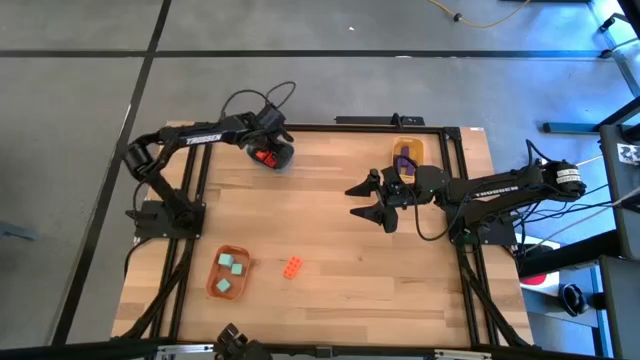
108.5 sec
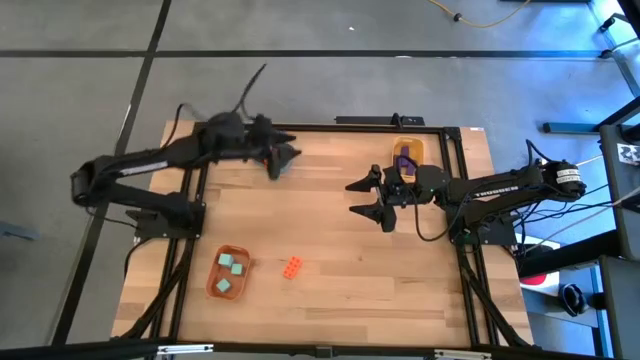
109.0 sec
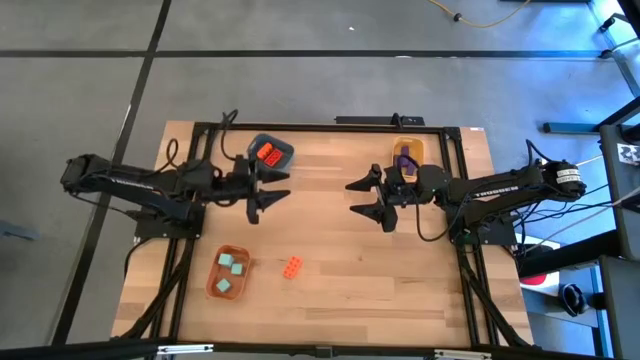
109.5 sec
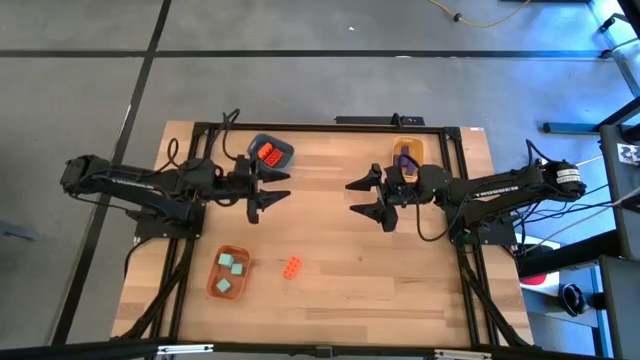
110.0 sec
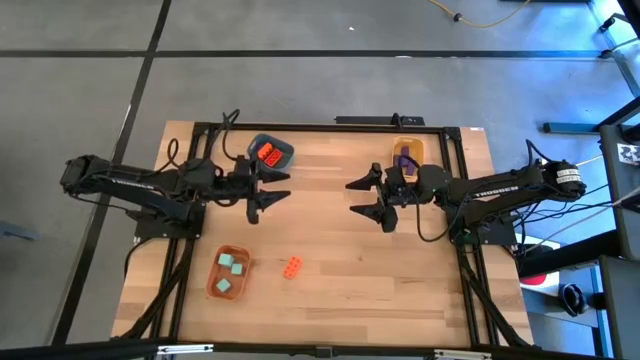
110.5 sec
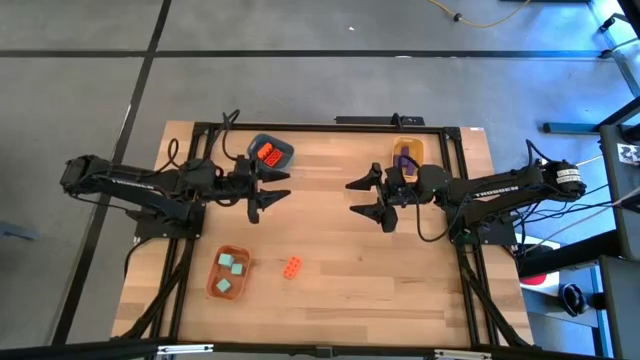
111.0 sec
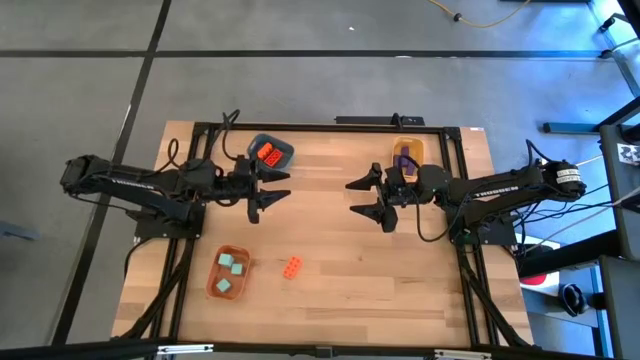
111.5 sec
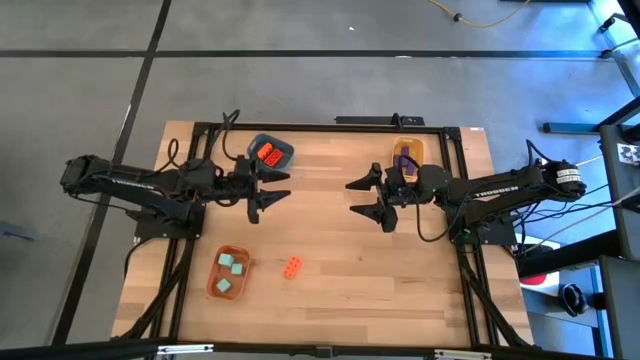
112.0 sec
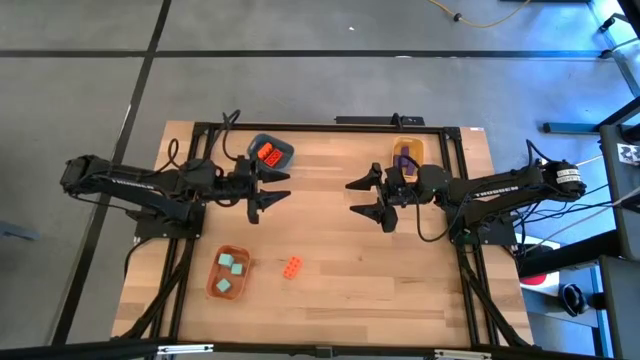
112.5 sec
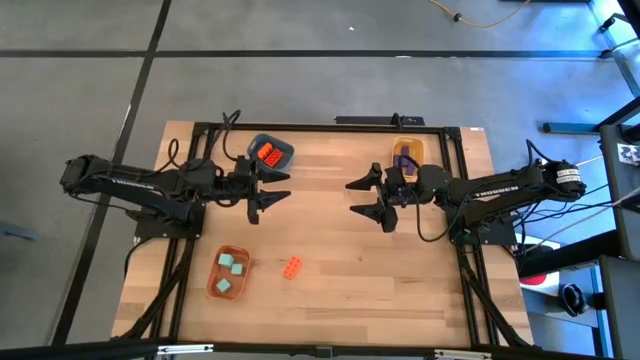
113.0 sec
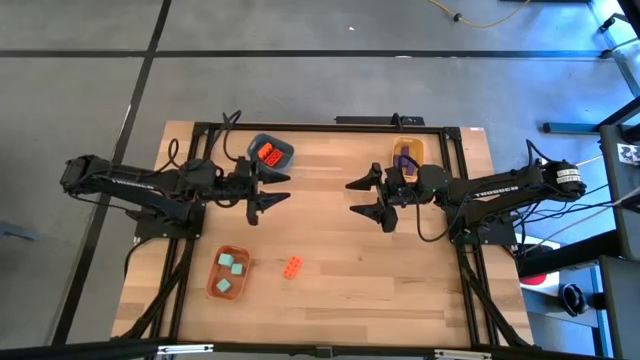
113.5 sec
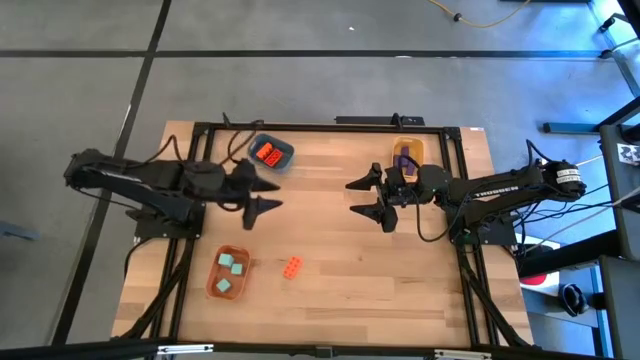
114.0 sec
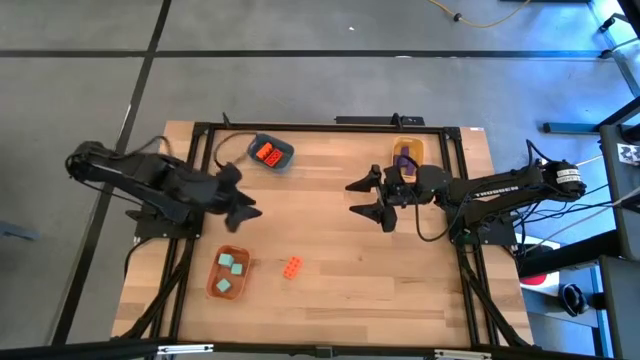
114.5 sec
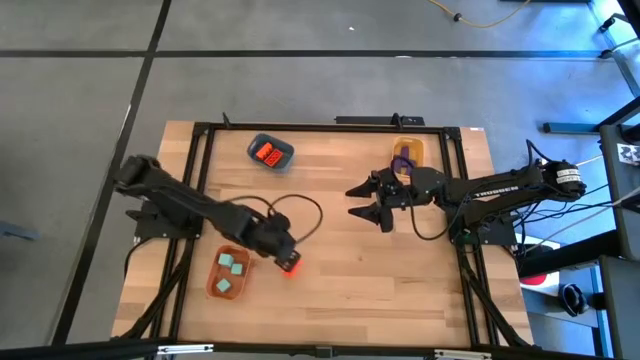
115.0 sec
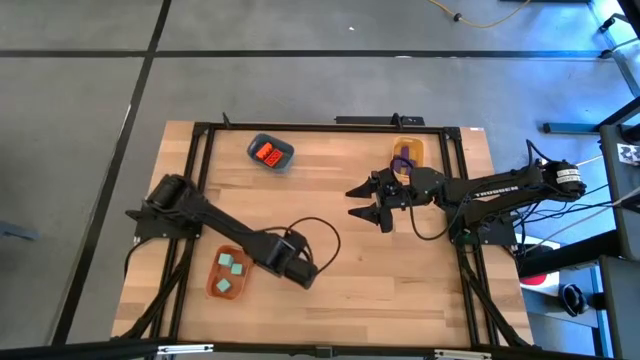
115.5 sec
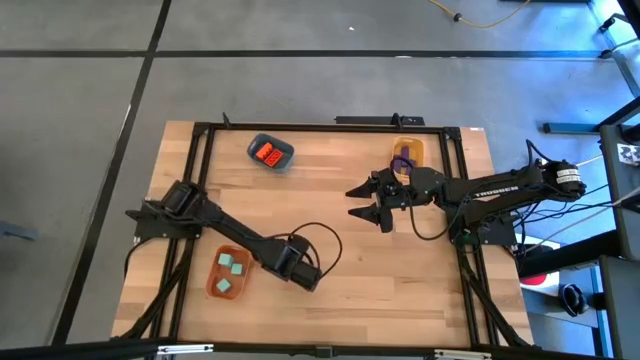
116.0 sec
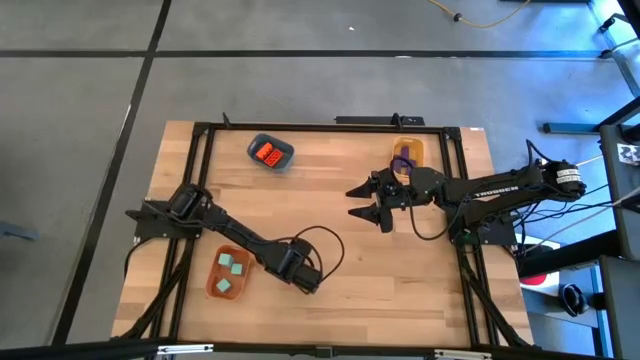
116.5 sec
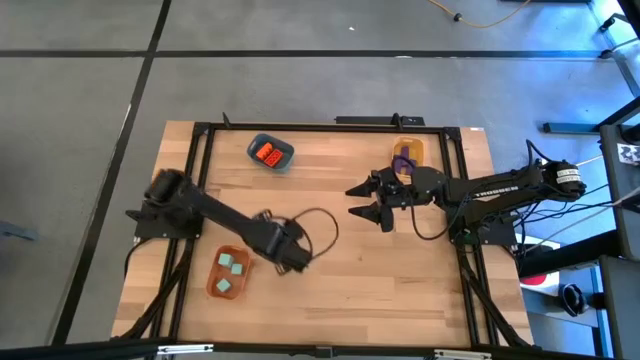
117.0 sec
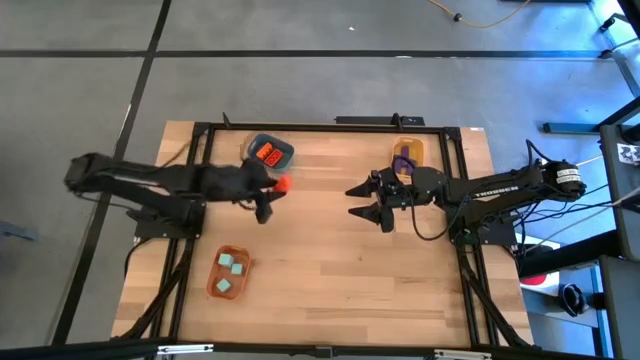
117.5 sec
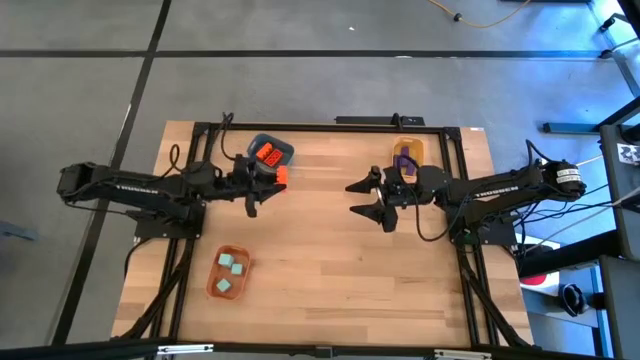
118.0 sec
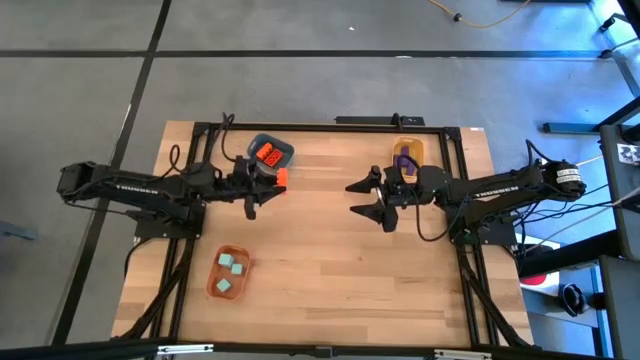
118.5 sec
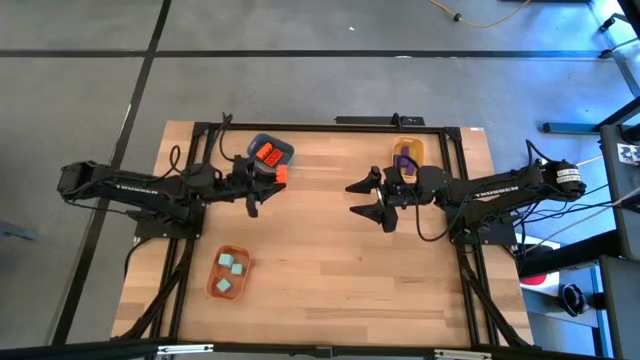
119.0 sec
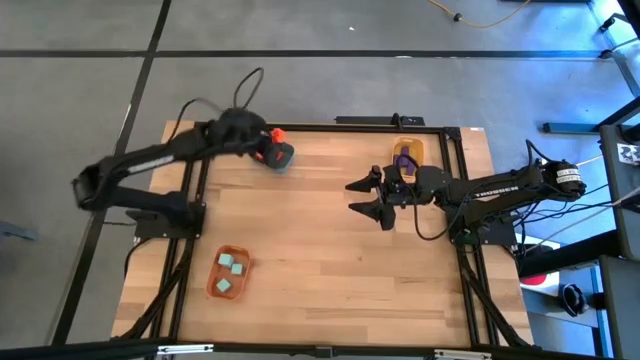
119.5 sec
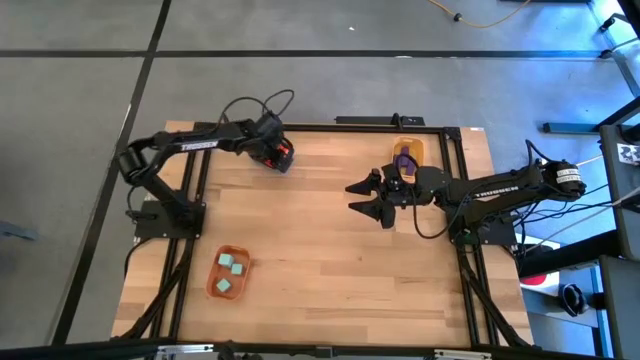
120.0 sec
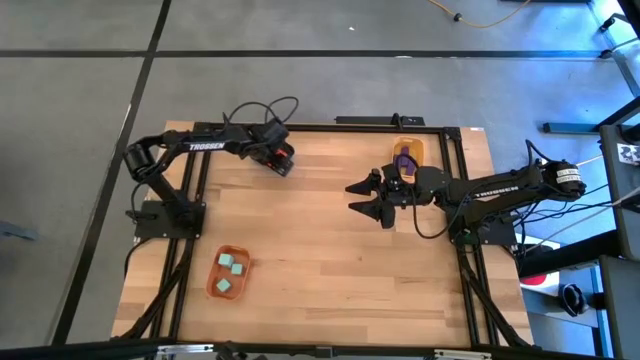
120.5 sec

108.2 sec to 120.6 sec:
Task: Sort & place blocks by color
Put the orange game piece into the blue bin

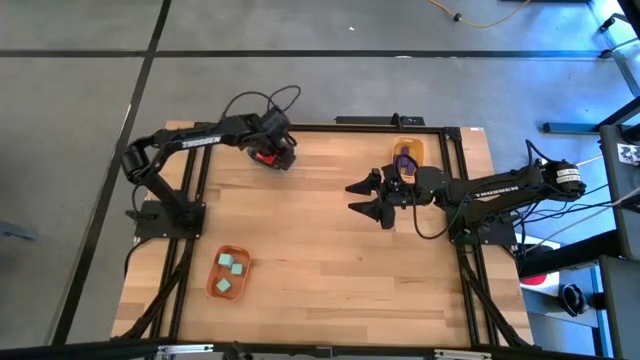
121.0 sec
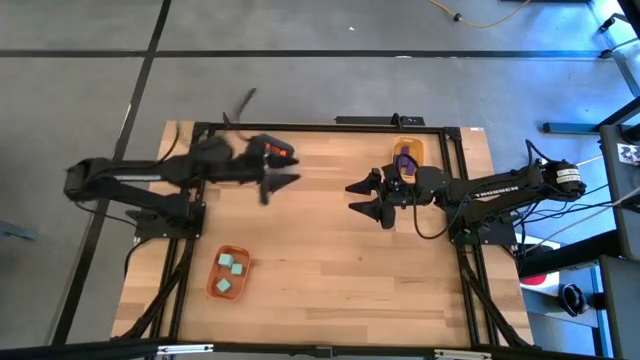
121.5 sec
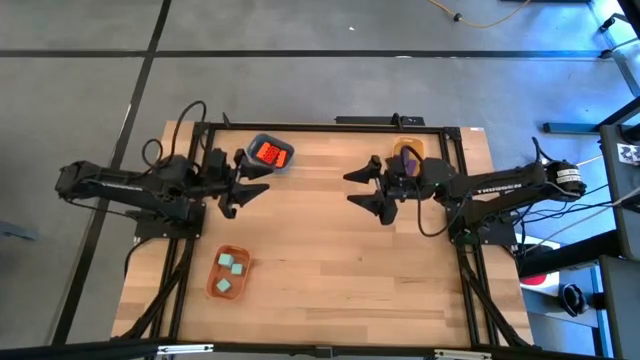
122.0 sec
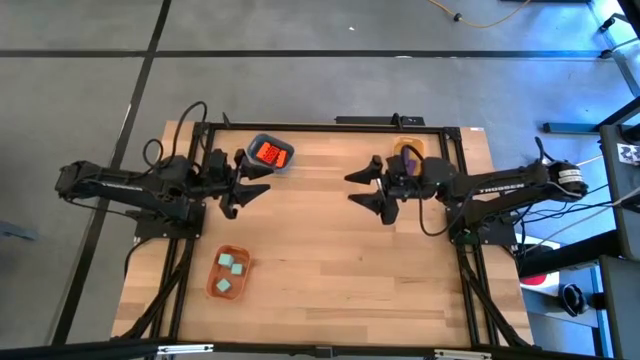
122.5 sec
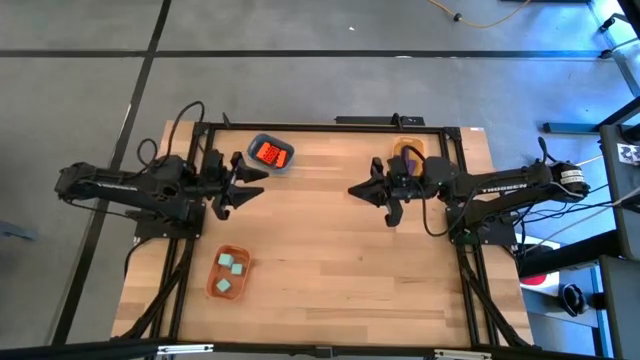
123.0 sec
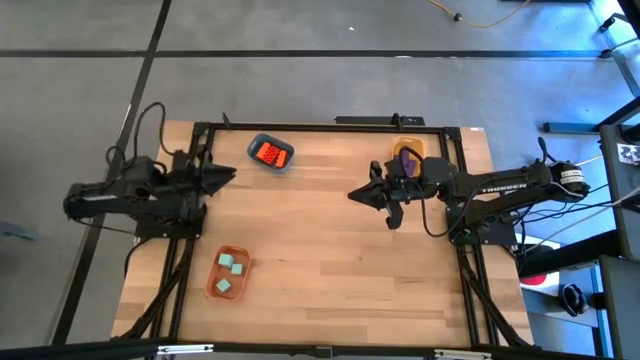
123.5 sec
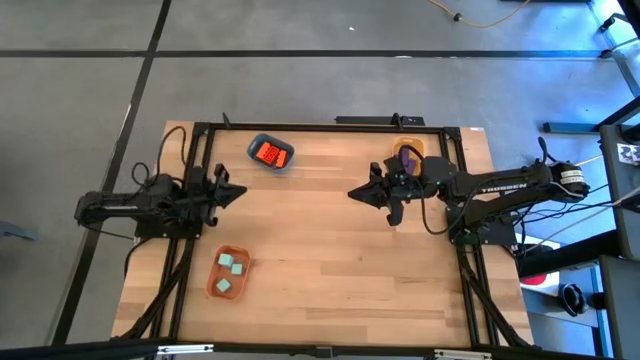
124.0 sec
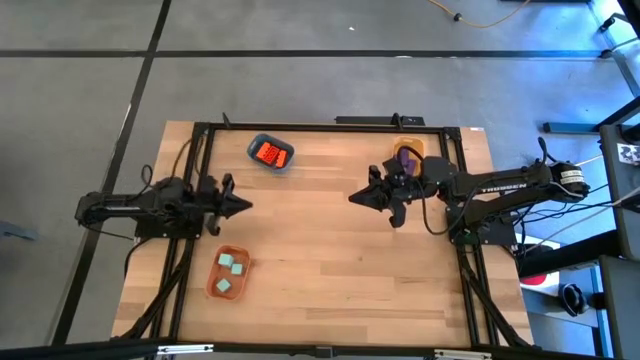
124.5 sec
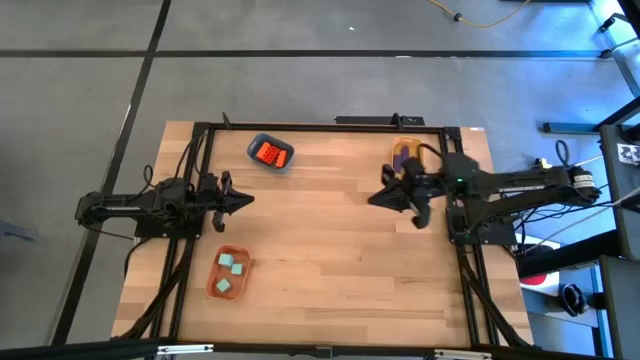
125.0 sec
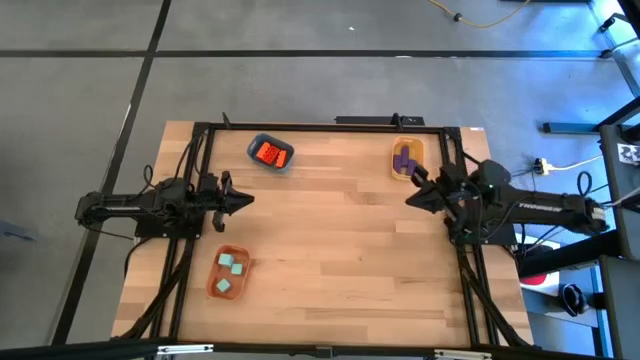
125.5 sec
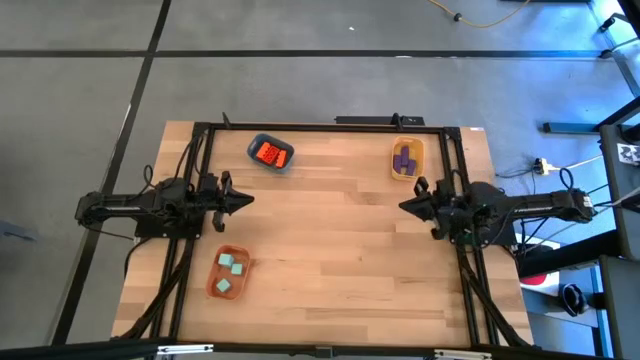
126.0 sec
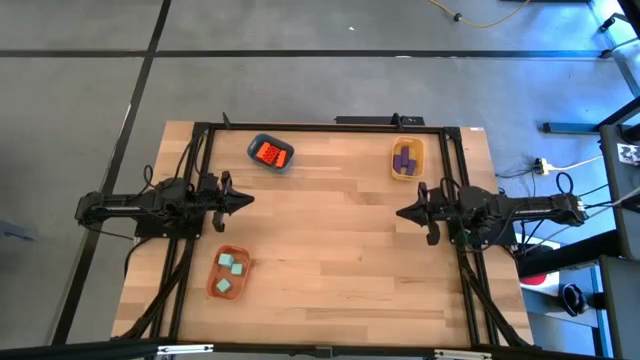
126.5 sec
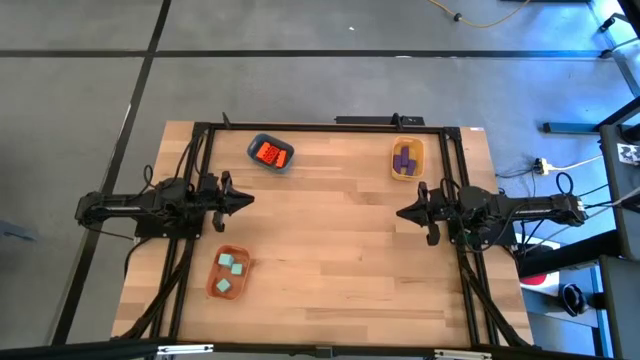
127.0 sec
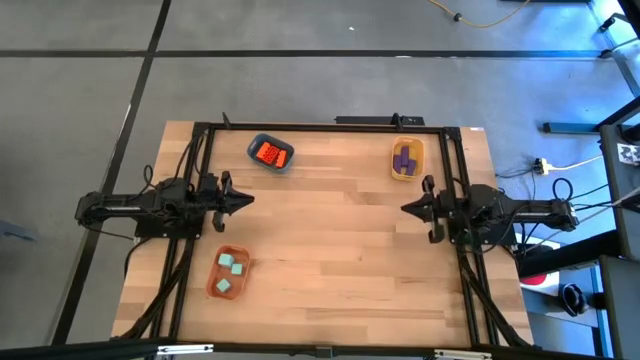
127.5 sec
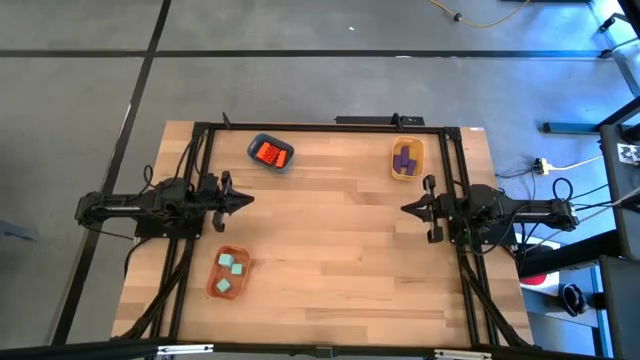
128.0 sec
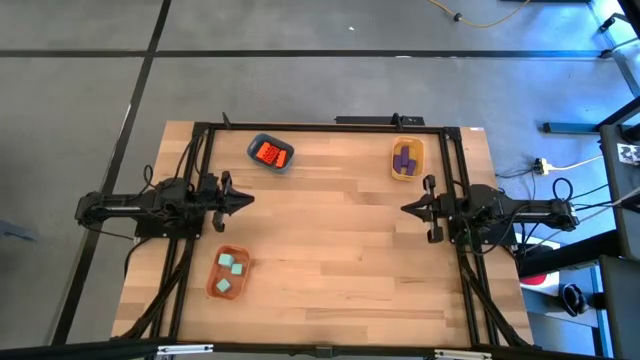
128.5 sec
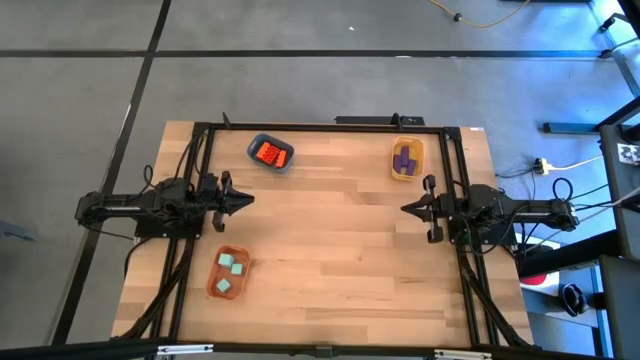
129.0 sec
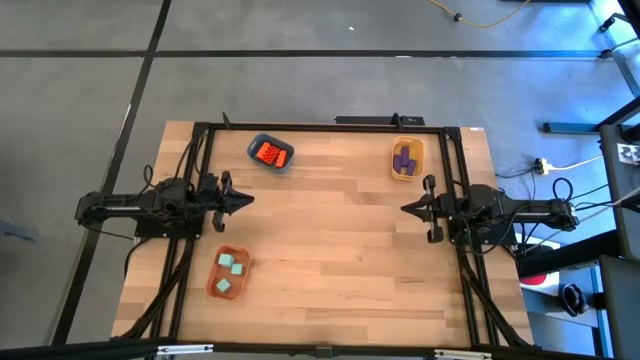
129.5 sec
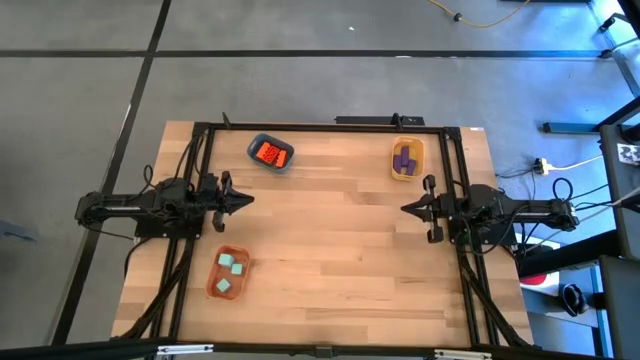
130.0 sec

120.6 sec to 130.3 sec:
Return to Home Position
